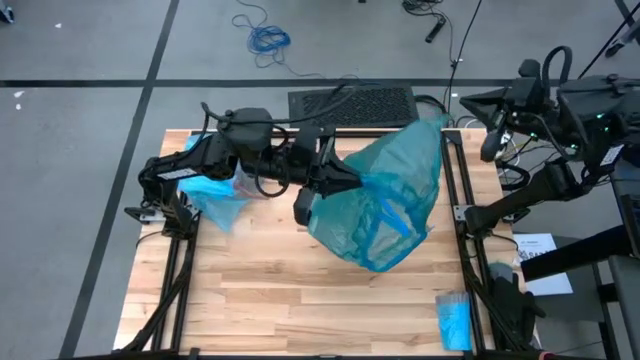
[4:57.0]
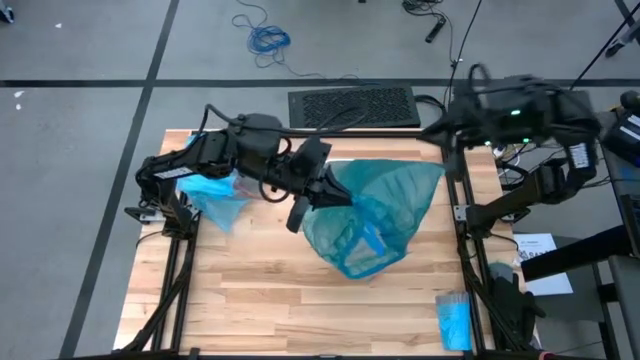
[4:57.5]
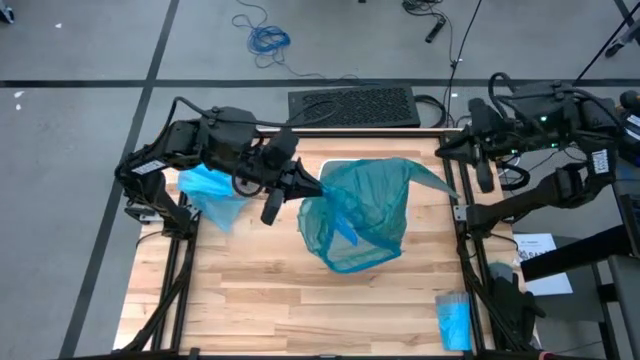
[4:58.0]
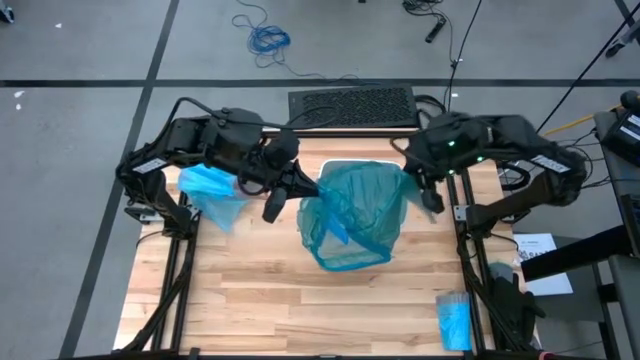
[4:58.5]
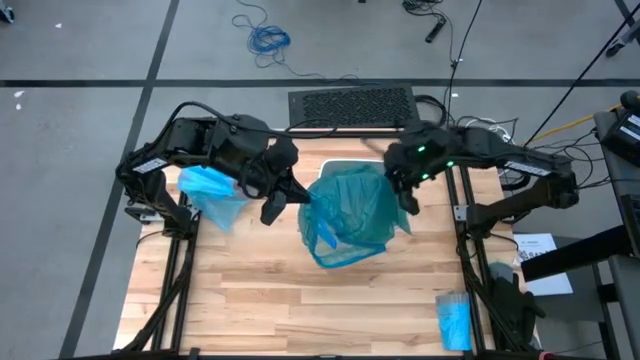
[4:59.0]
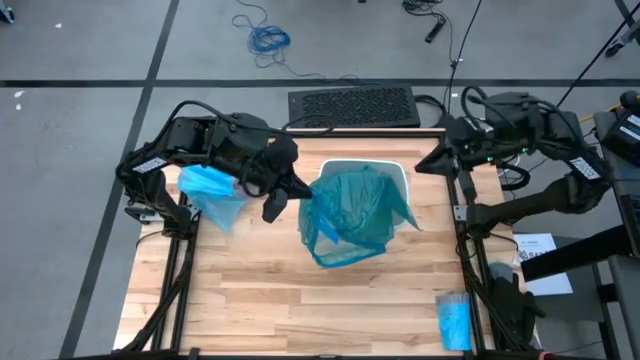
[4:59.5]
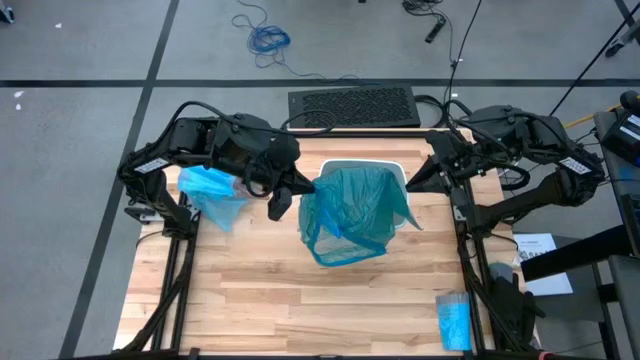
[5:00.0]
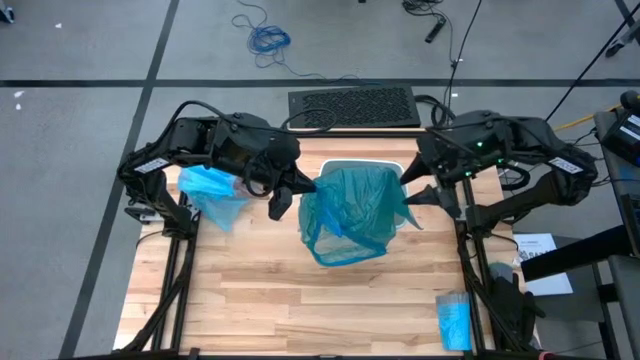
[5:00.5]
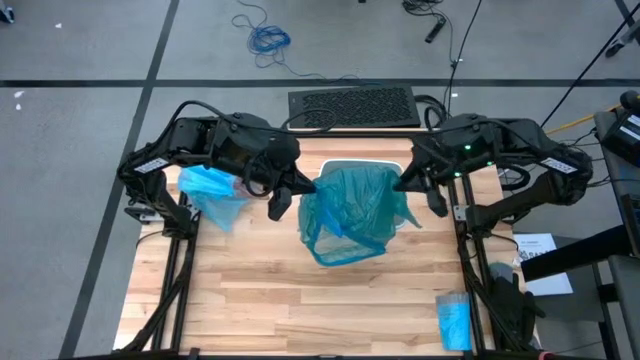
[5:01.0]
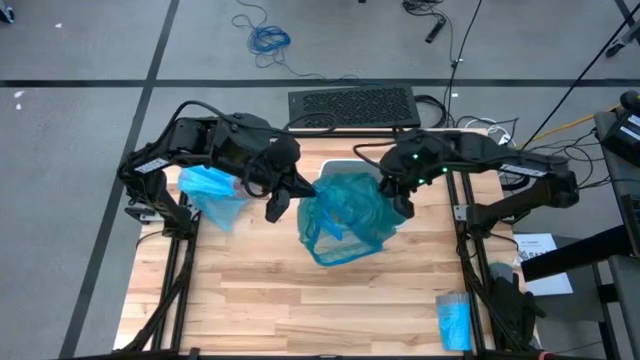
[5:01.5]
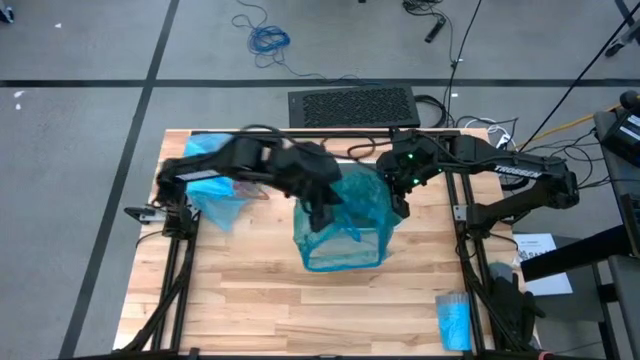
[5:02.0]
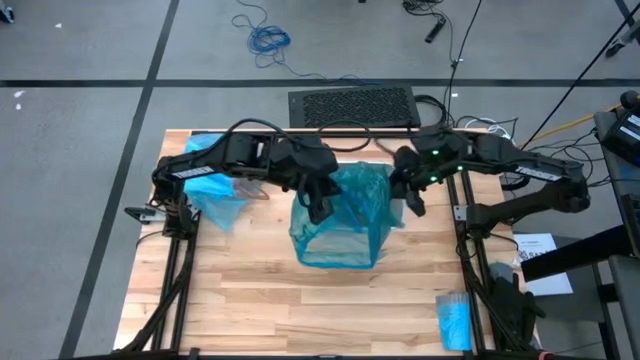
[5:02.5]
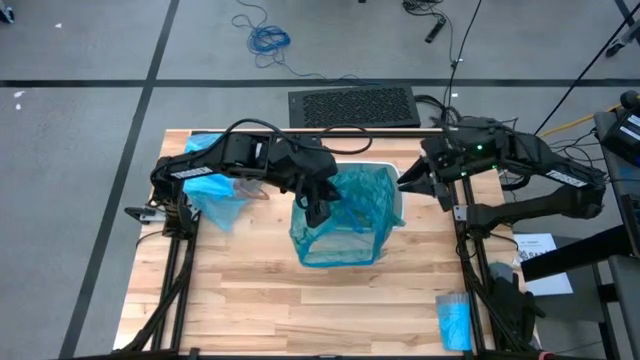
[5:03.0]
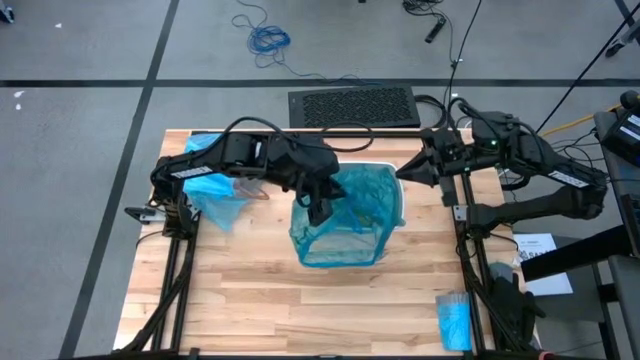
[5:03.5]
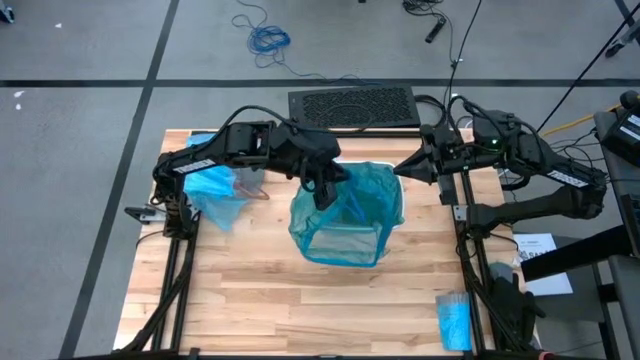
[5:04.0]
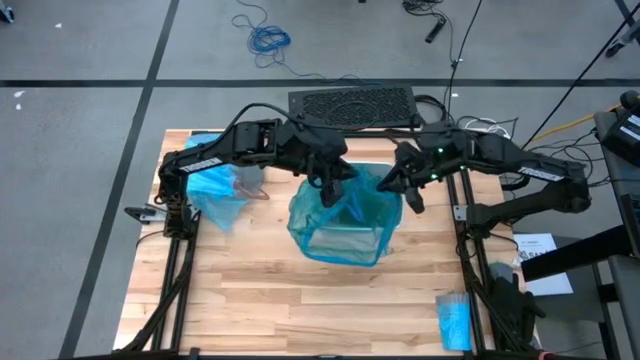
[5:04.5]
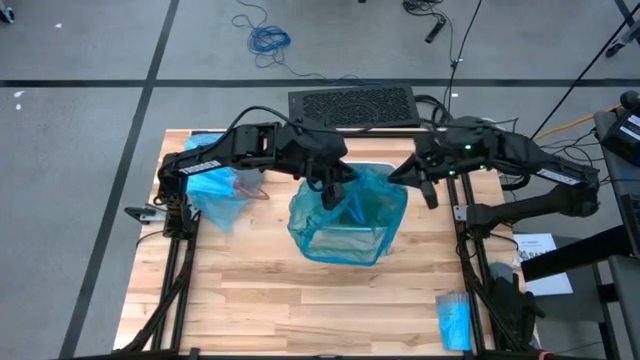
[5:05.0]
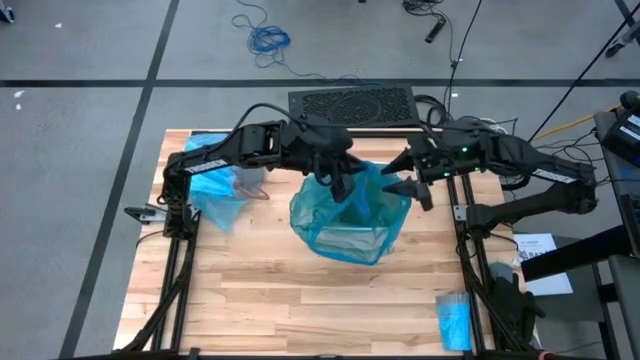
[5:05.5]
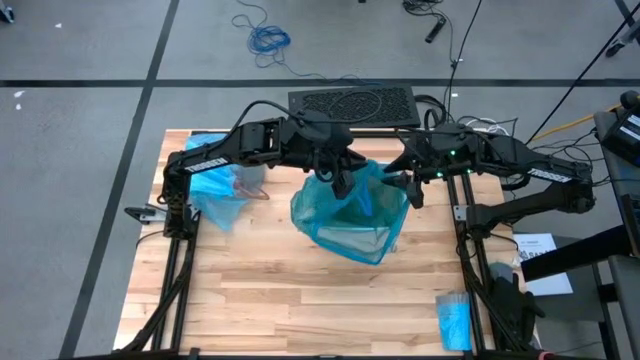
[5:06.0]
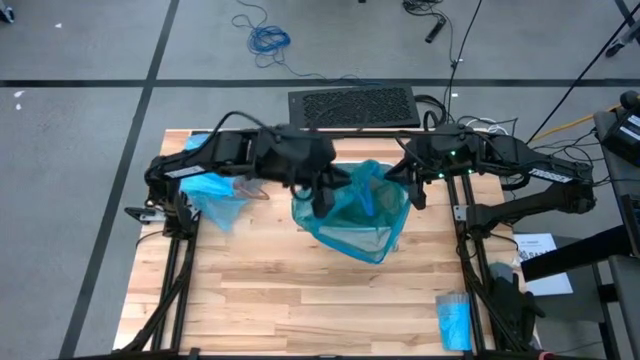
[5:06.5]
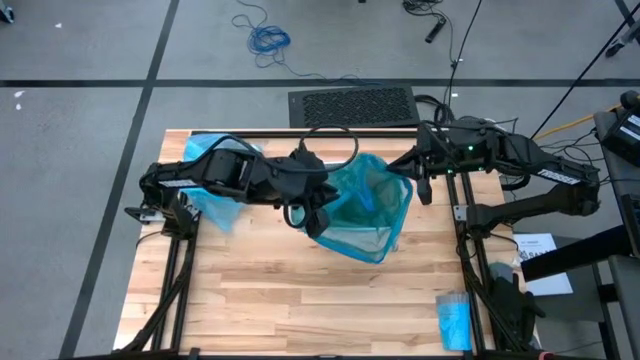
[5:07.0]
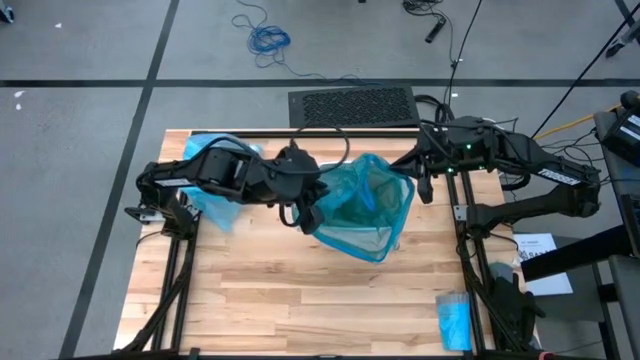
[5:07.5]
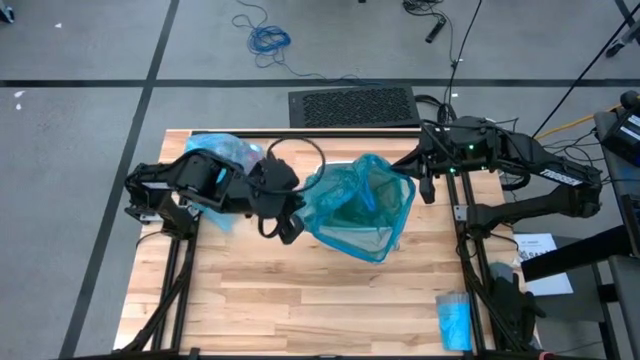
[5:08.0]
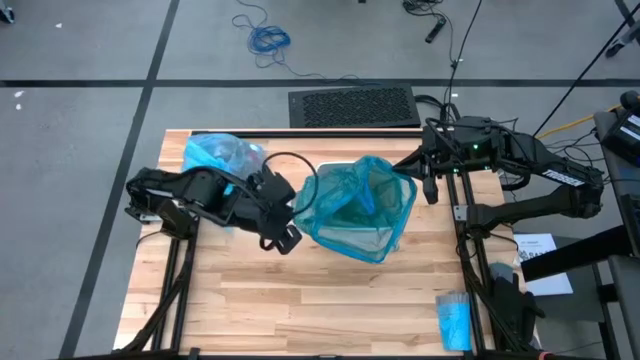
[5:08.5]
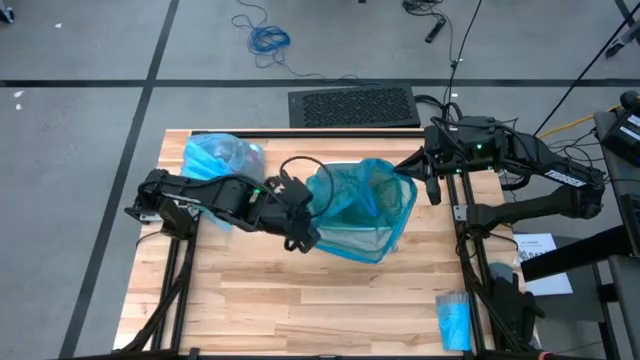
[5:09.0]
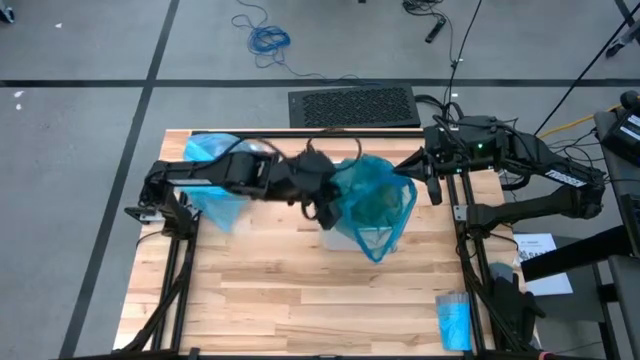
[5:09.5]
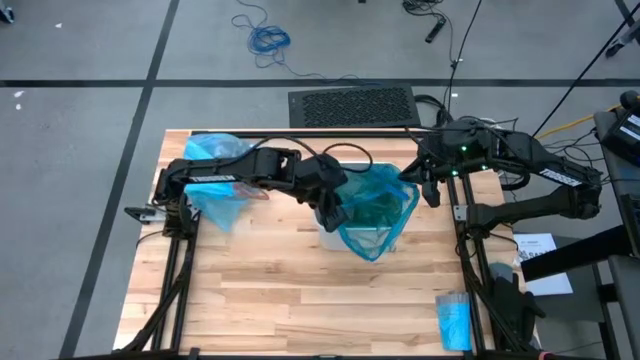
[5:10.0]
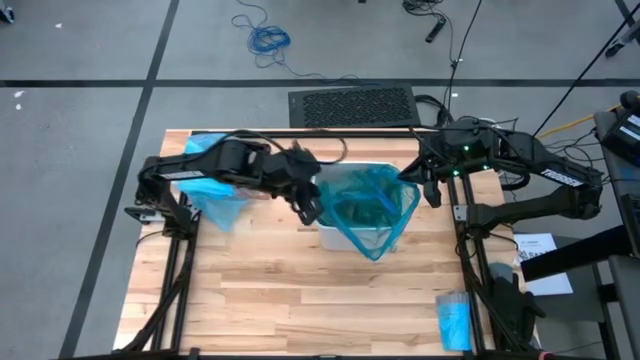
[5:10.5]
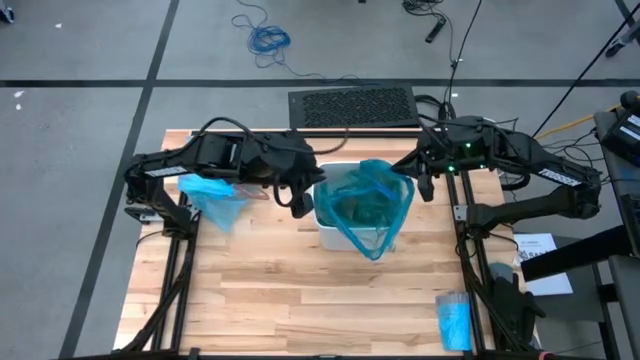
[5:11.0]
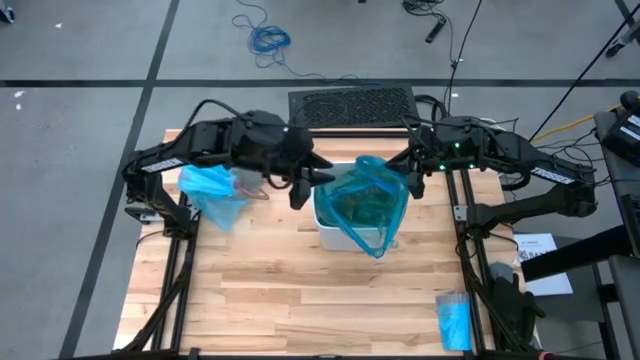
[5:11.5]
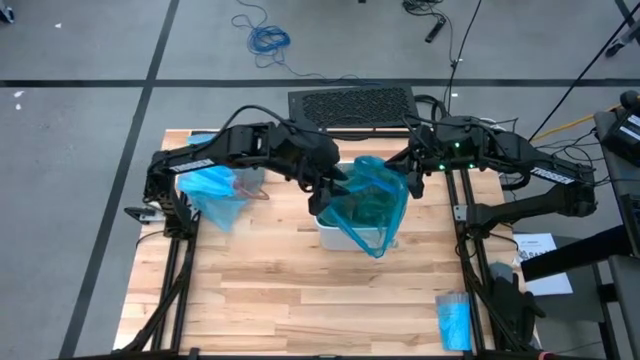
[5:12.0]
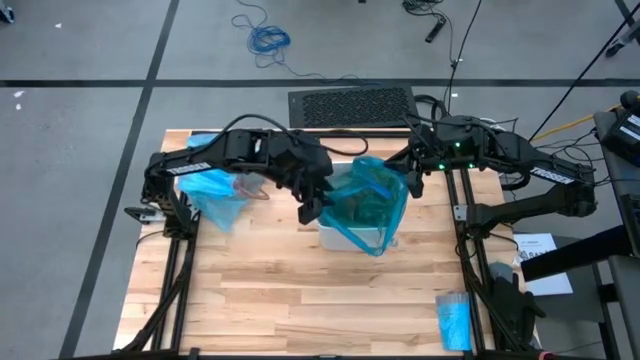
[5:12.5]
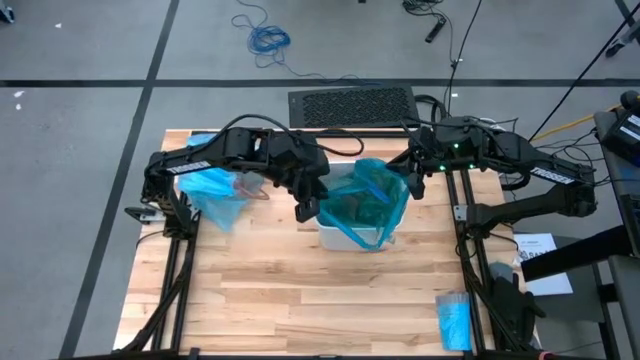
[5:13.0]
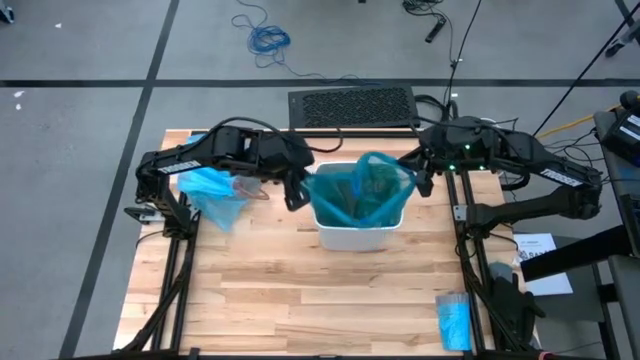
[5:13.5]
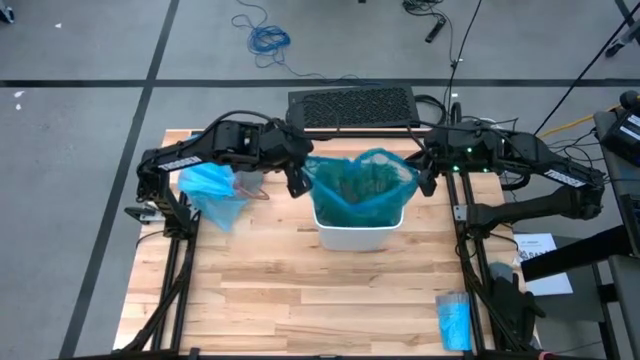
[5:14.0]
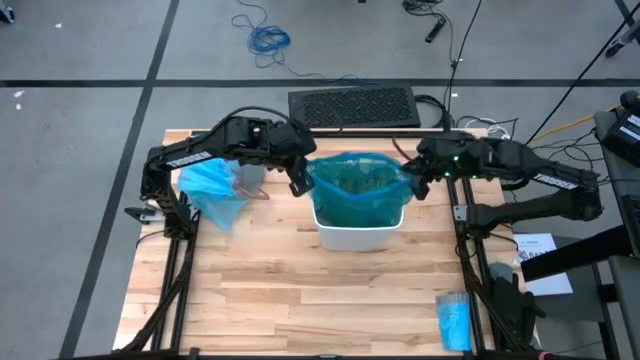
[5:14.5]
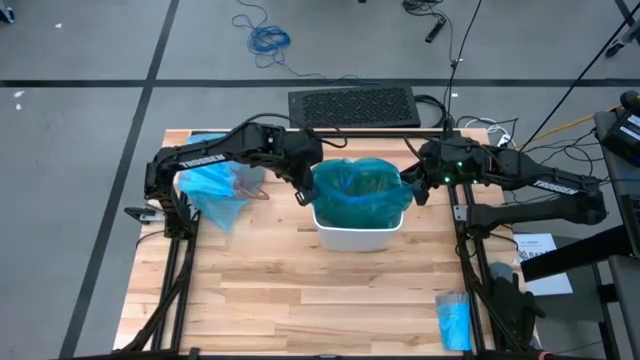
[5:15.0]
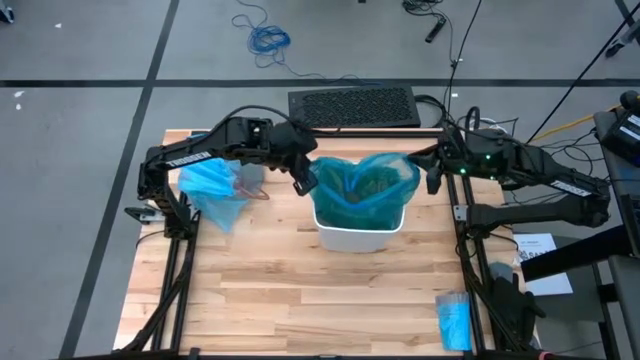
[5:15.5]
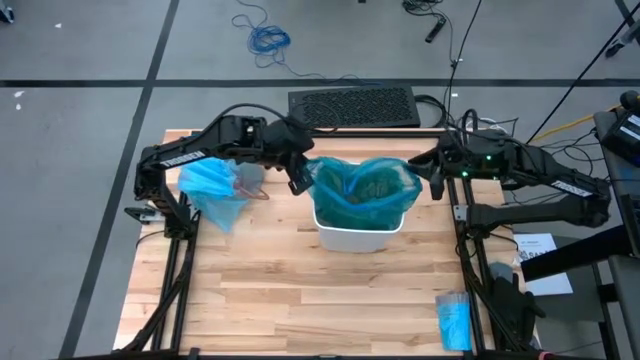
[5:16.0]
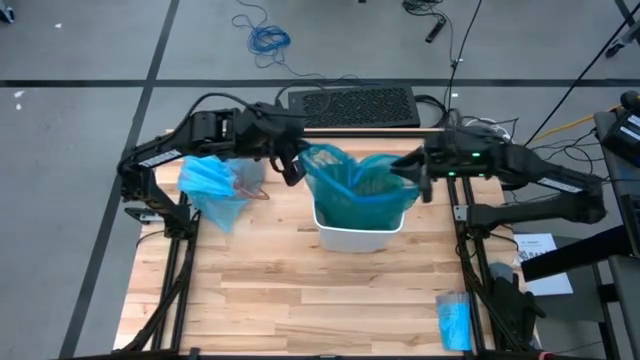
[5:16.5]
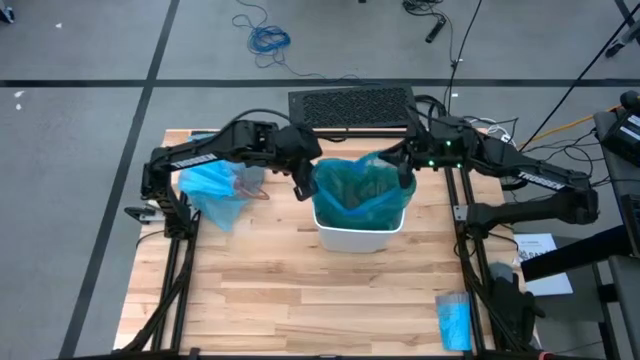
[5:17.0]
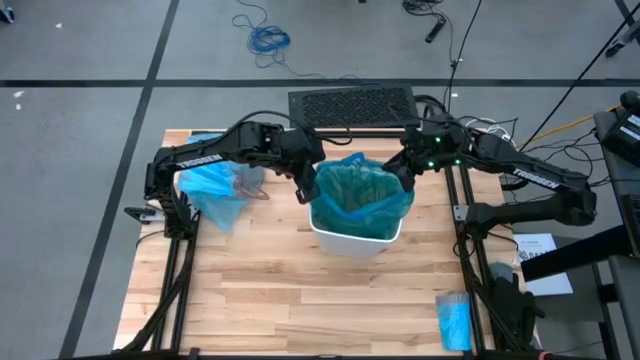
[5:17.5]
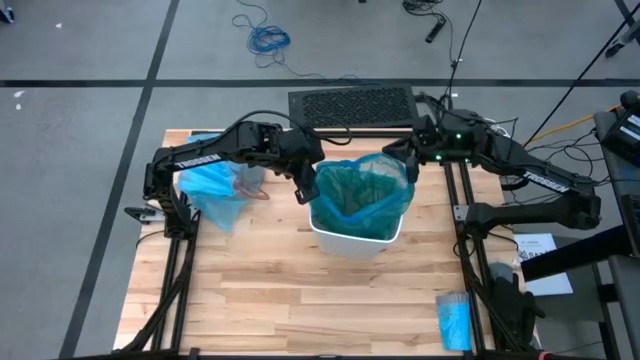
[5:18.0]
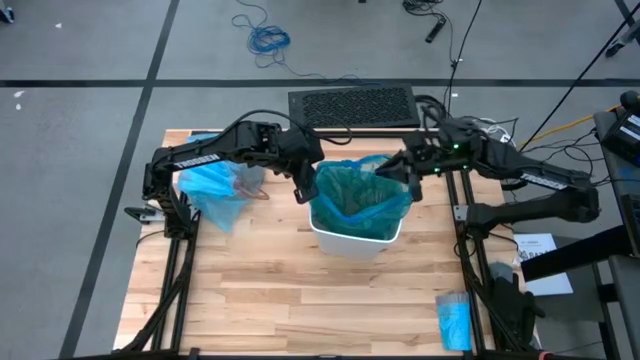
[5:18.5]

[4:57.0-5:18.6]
Task: place trash/remove bag and relplace
Insert the new blue trash bag into the white trash bin
